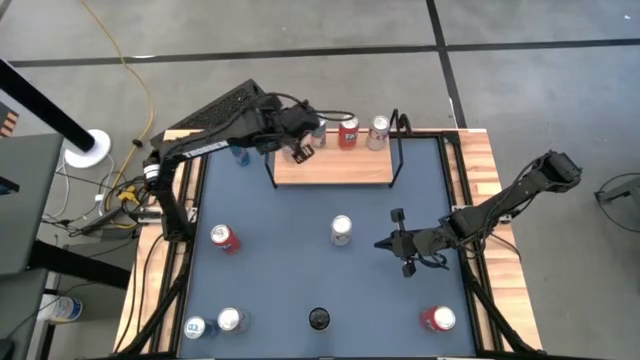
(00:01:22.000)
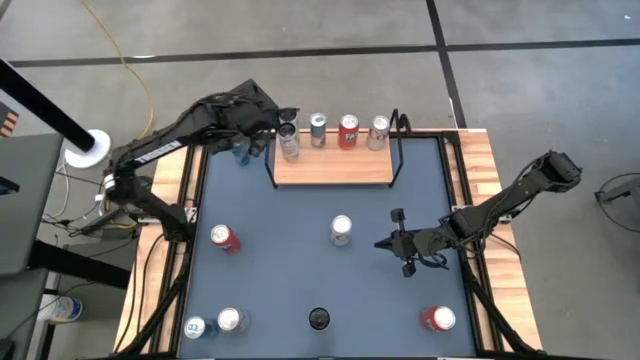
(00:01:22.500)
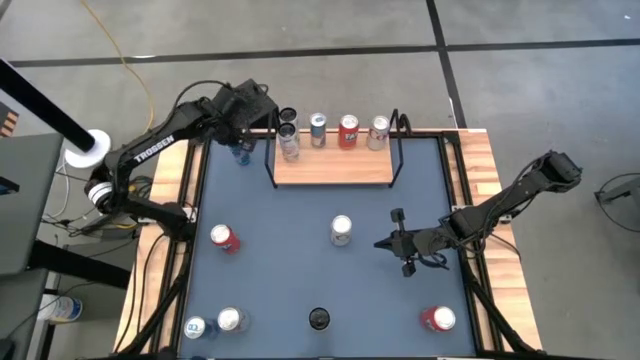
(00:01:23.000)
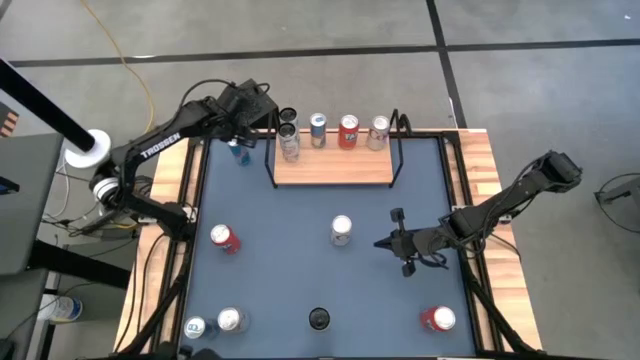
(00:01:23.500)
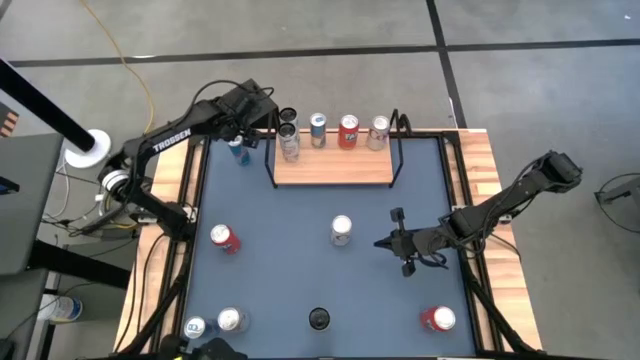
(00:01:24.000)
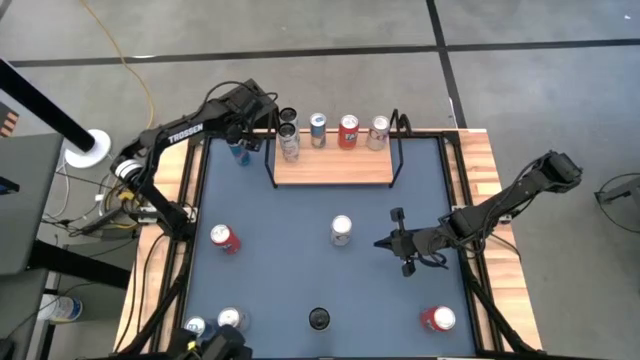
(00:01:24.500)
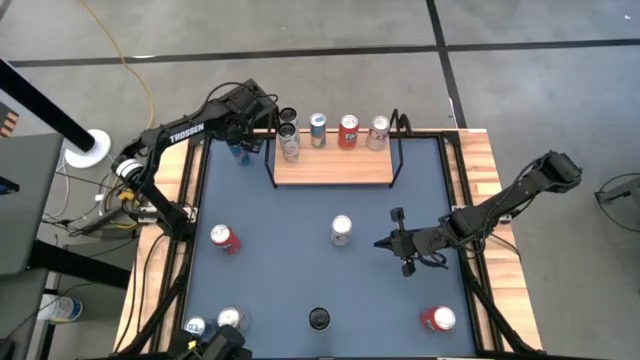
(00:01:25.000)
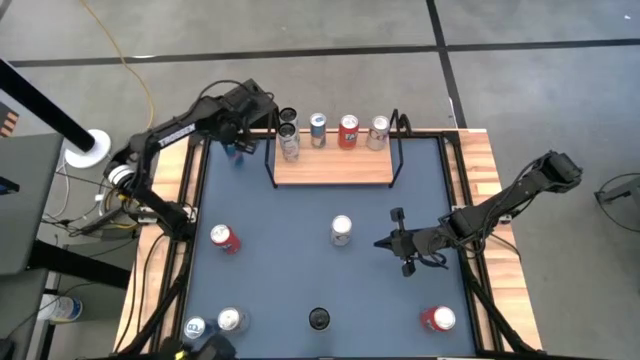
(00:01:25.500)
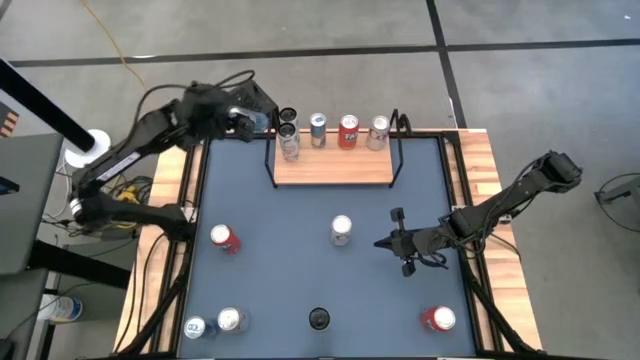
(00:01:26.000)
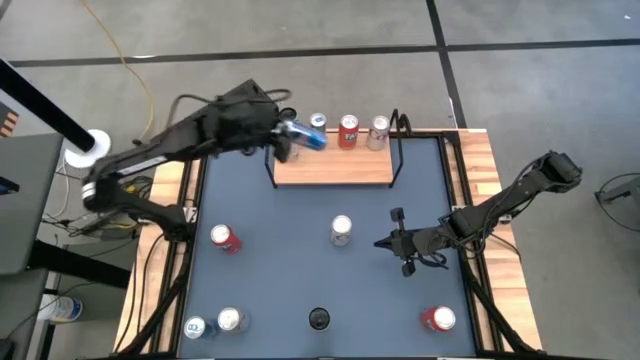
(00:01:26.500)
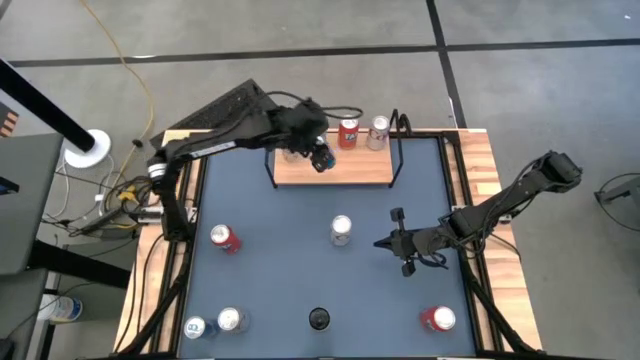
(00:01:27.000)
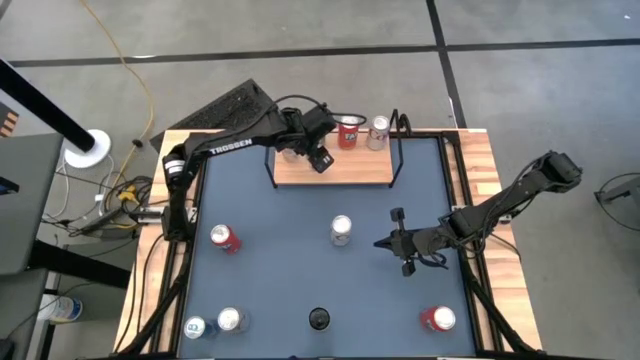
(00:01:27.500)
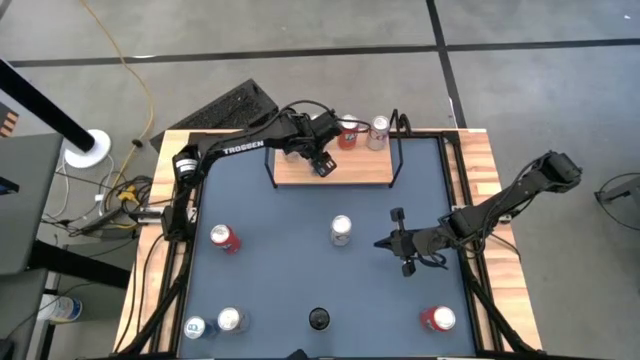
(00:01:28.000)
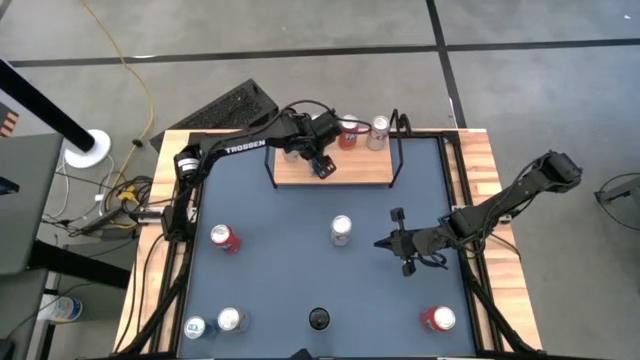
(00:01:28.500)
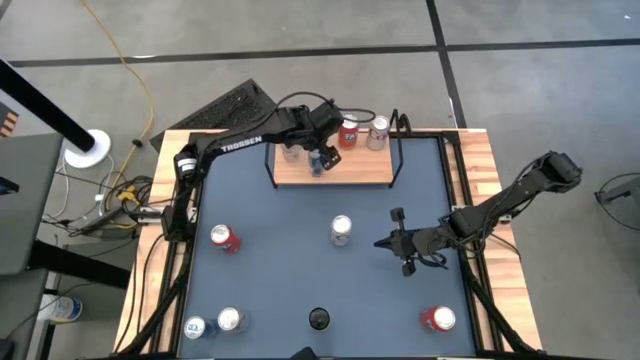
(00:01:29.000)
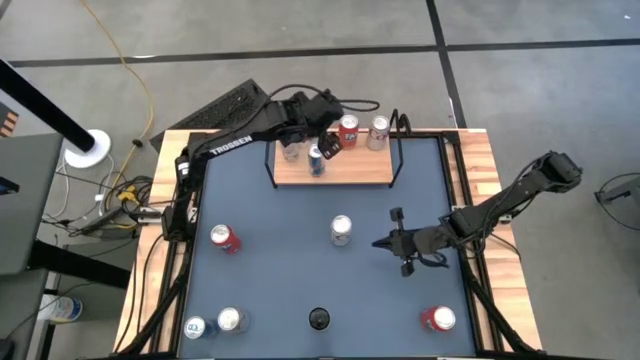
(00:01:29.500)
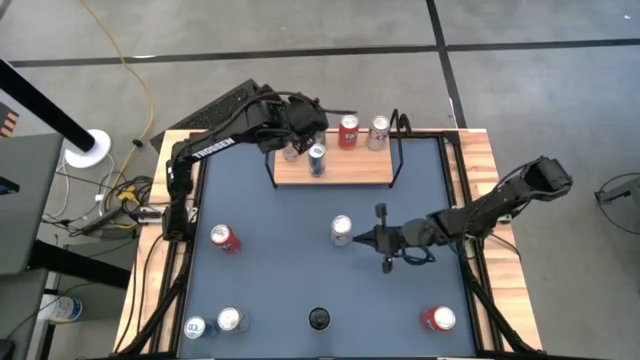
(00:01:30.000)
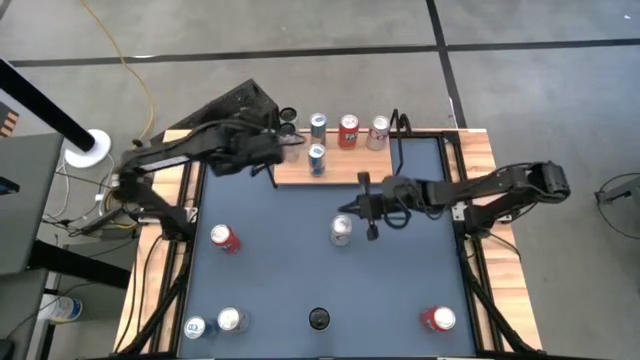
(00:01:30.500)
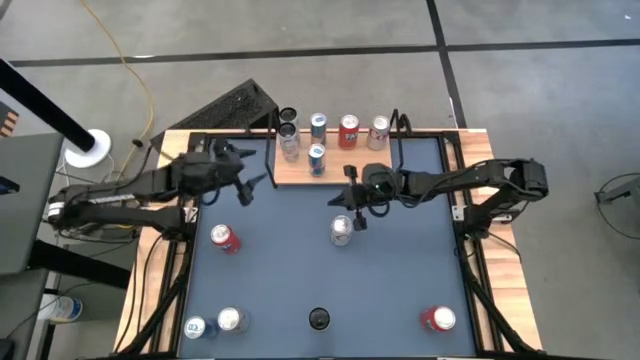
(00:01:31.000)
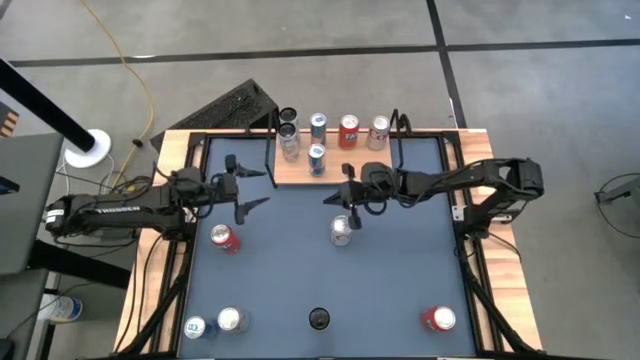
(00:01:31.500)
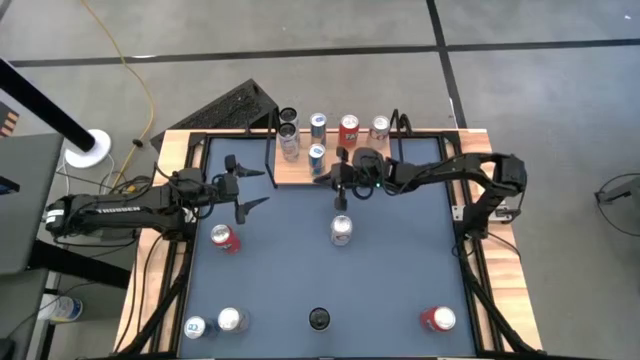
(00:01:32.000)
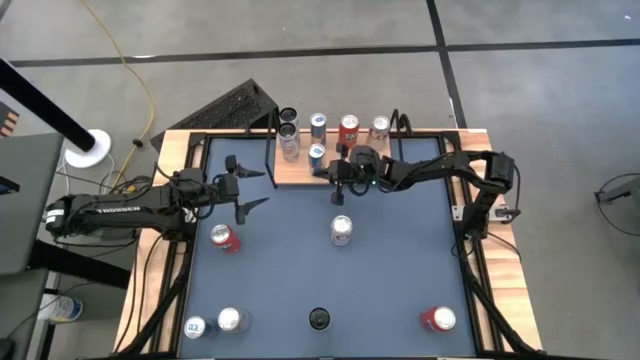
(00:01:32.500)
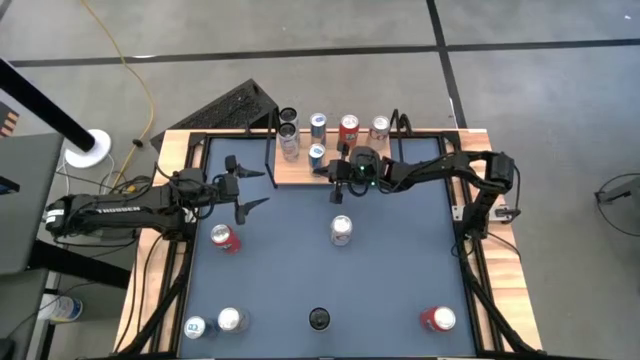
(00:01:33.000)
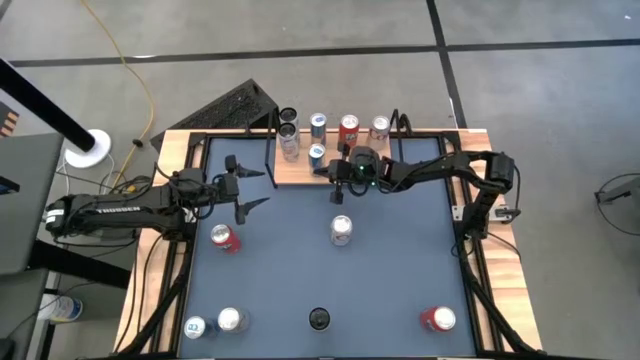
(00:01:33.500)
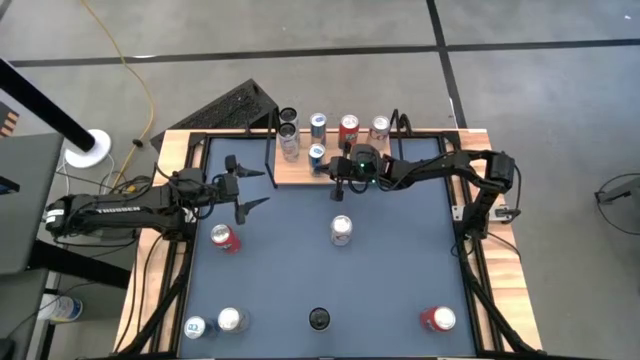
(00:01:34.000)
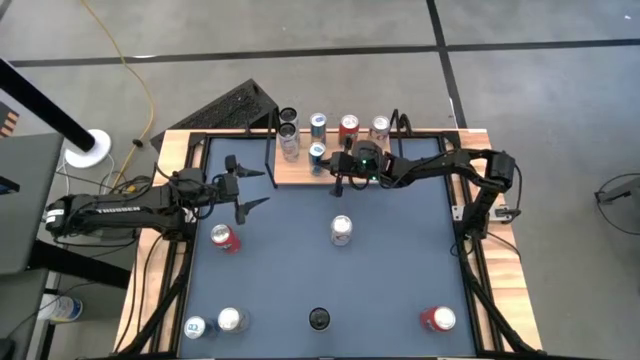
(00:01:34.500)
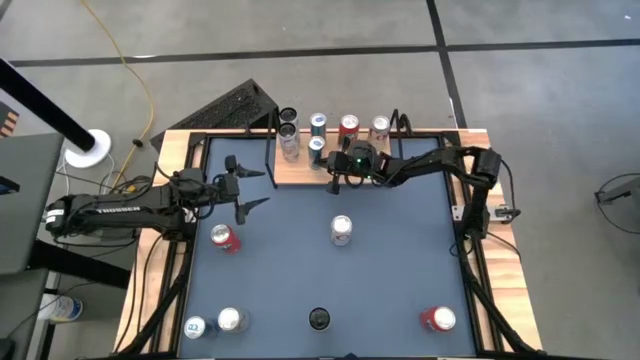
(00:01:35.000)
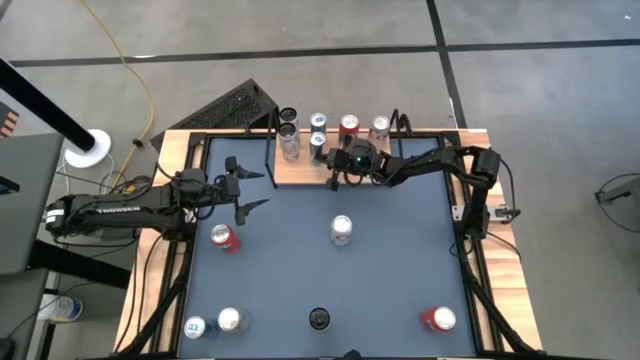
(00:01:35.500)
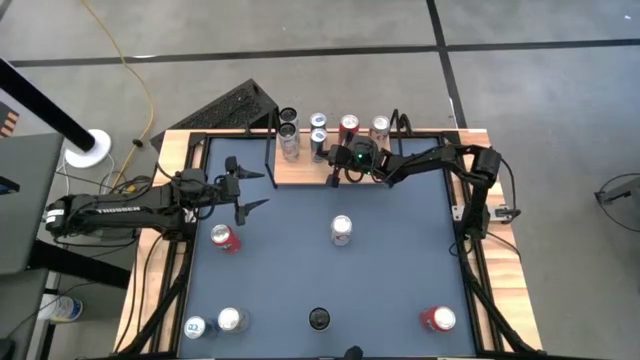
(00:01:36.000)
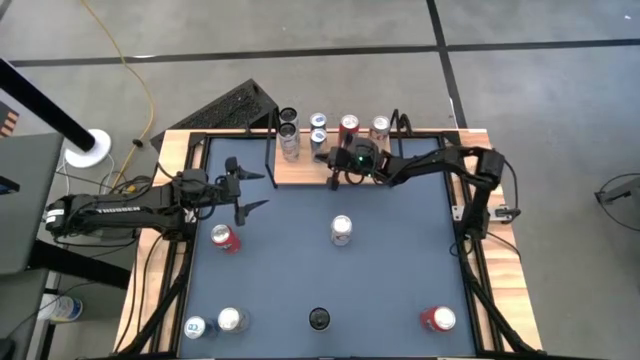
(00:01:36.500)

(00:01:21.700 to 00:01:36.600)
Task: Place canned beverage on shelf
Put the top blue soda can on the shelf aligned with the other blue soda can

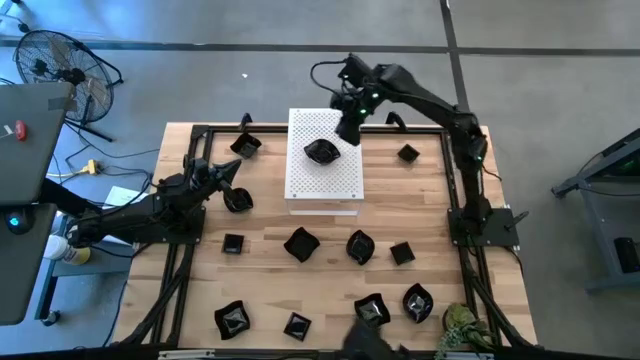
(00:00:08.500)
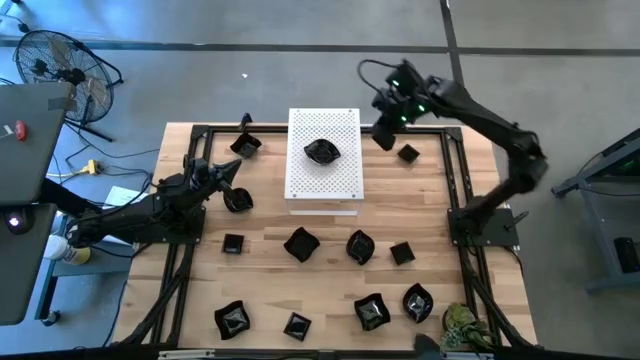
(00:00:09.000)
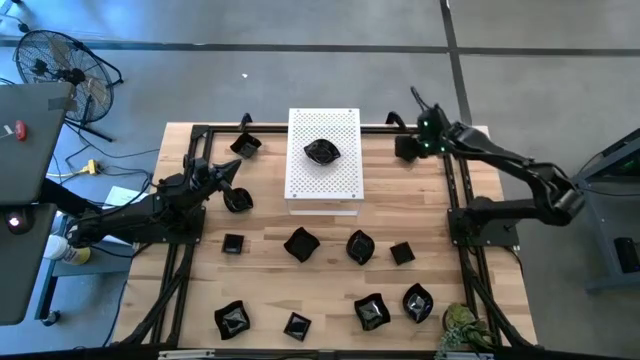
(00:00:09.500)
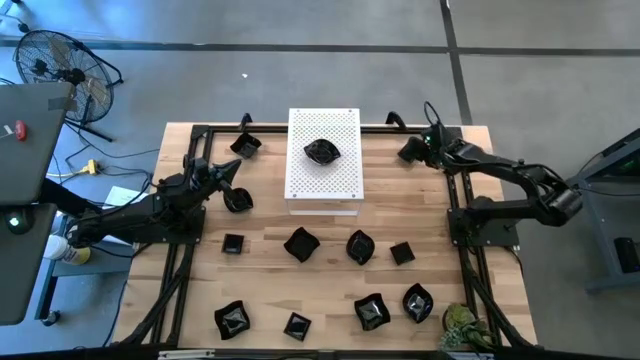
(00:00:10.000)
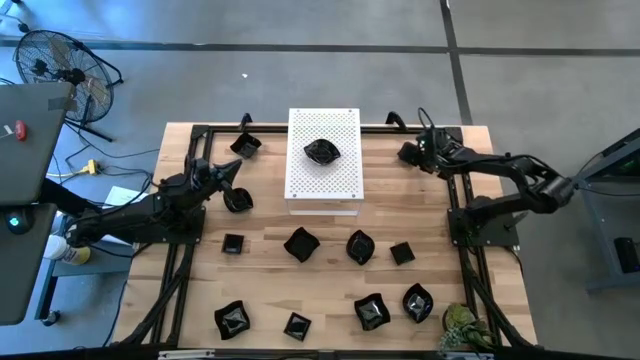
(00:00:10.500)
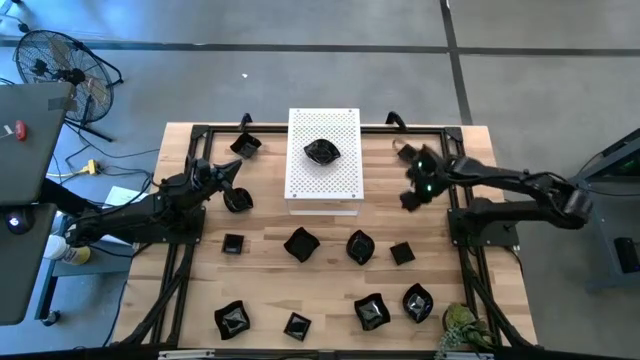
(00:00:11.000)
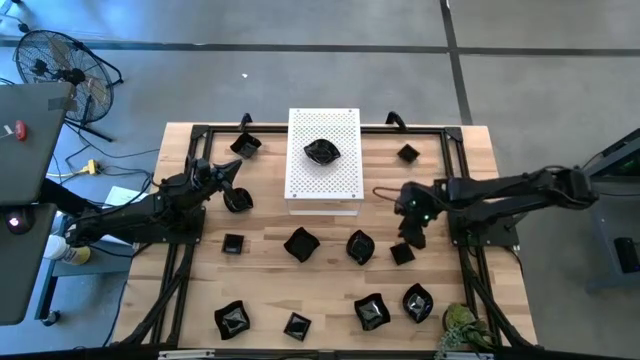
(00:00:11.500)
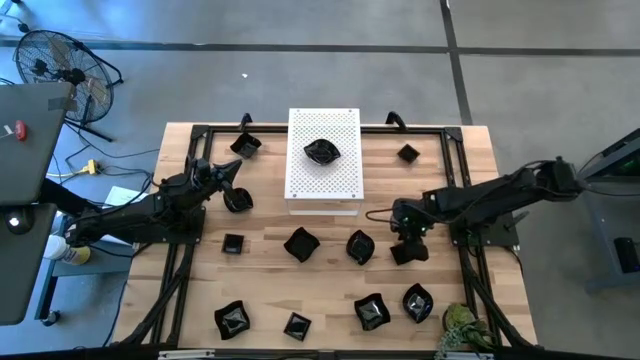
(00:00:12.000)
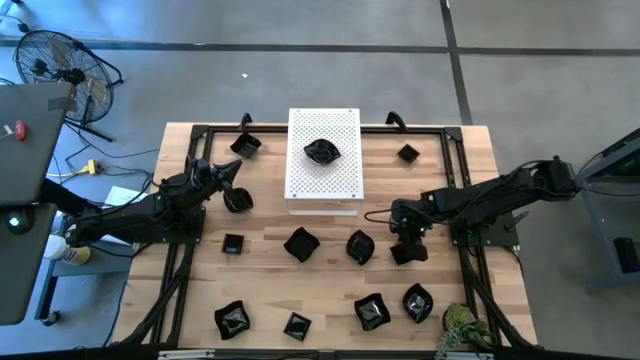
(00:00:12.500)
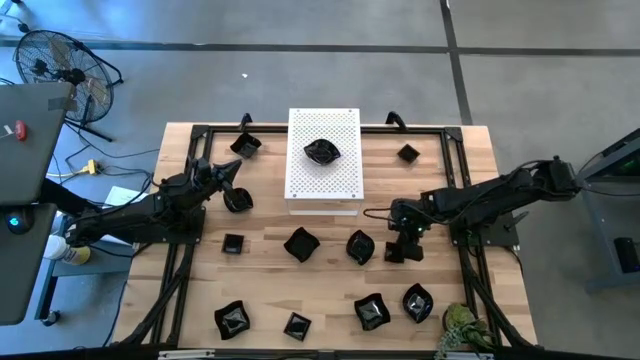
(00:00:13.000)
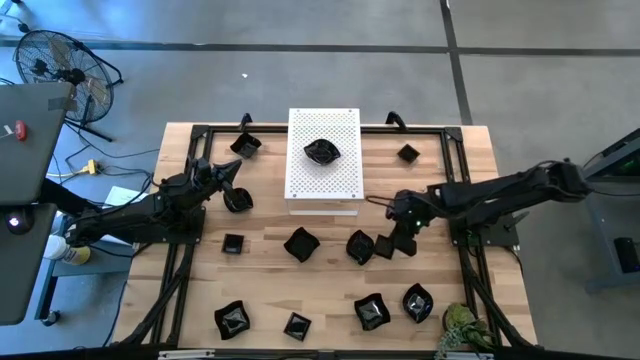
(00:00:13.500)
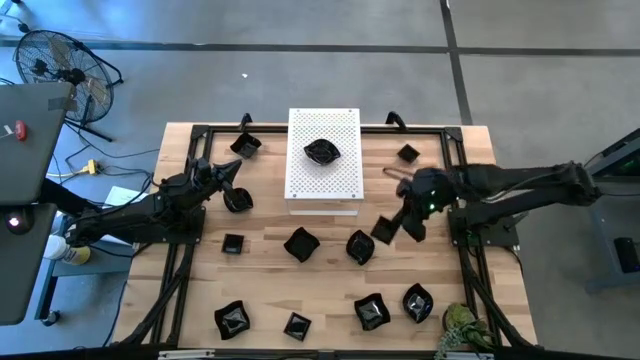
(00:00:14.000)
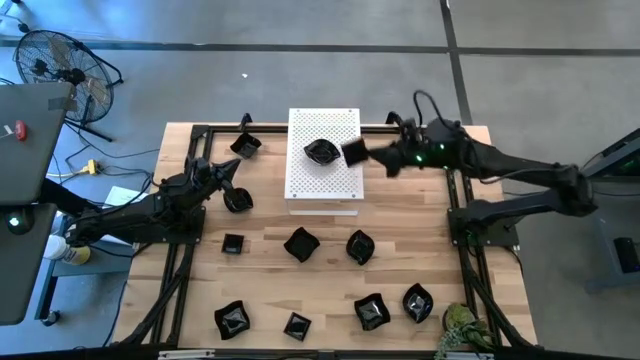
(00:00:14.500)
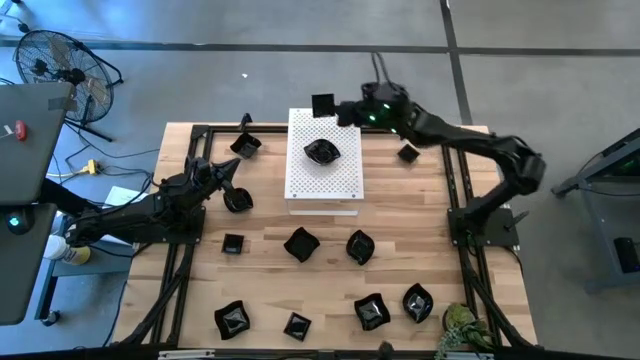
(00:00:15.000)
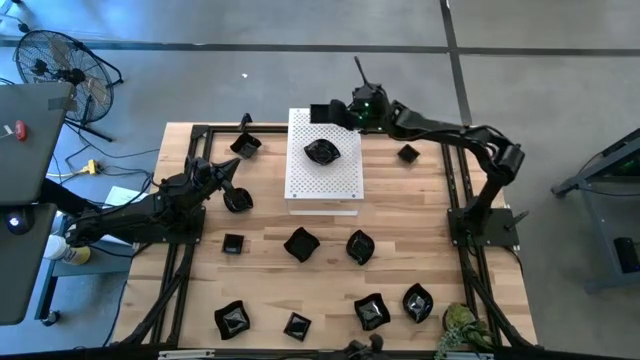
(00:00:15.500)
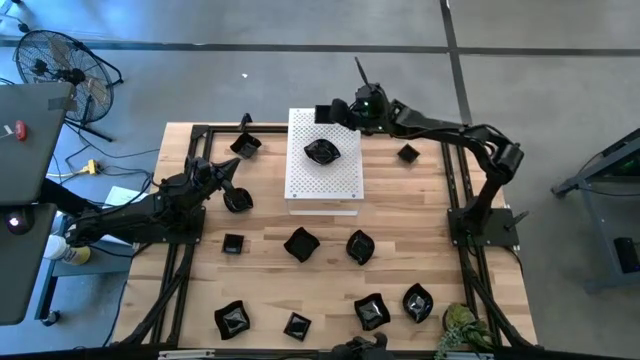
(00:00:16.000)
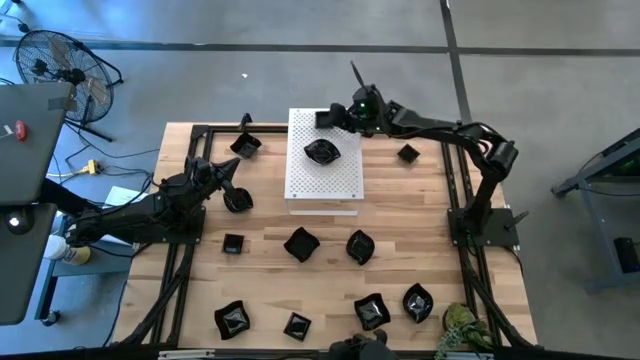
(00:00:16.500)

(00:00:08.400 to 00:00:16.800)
Task: Pick & Place Mini shaped plates
Put the square plate on the shelf
